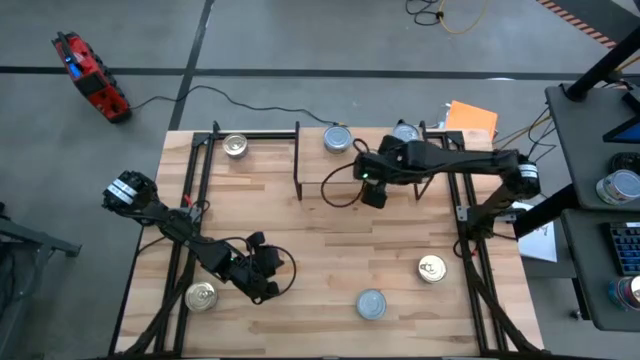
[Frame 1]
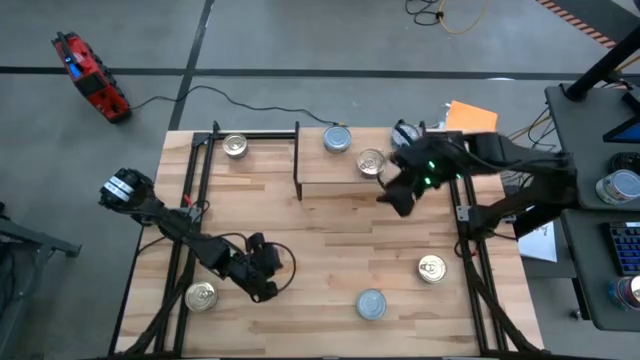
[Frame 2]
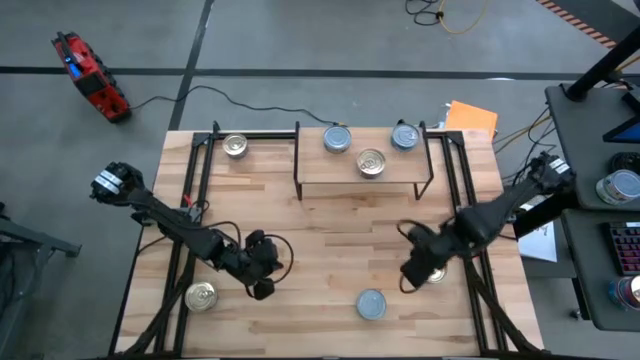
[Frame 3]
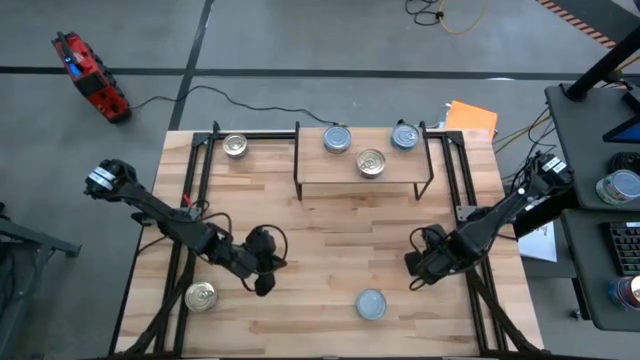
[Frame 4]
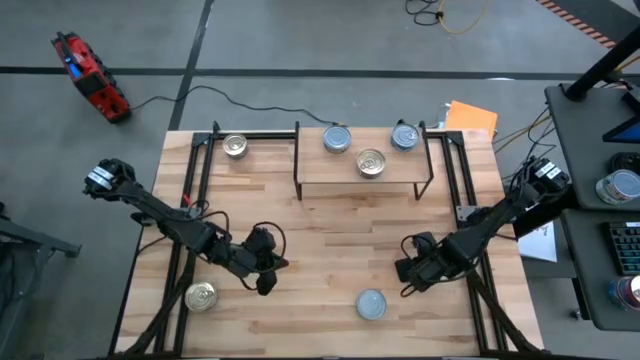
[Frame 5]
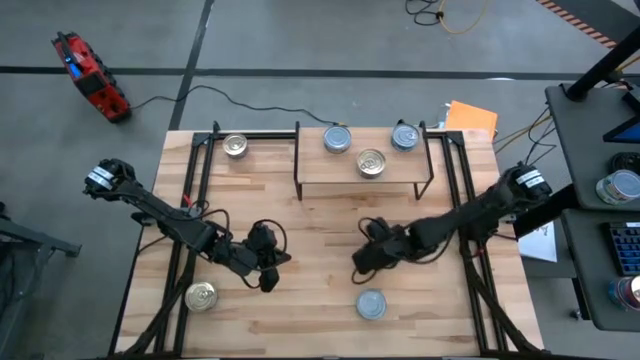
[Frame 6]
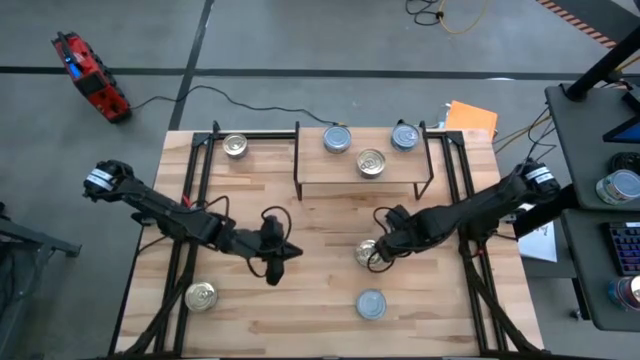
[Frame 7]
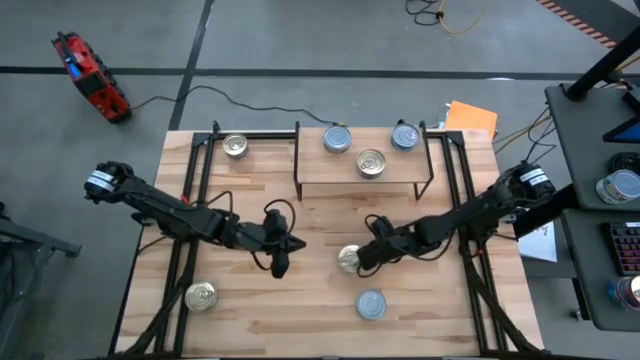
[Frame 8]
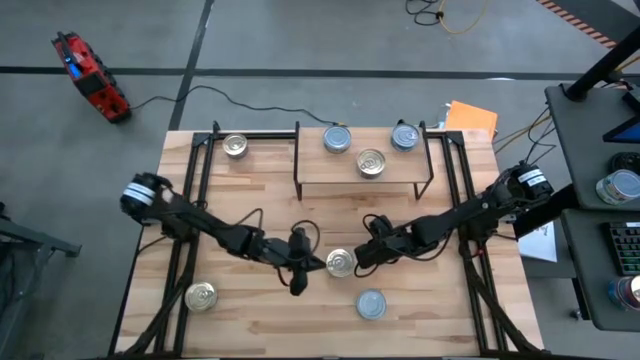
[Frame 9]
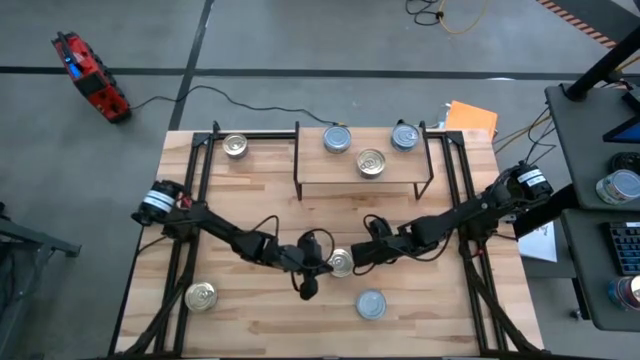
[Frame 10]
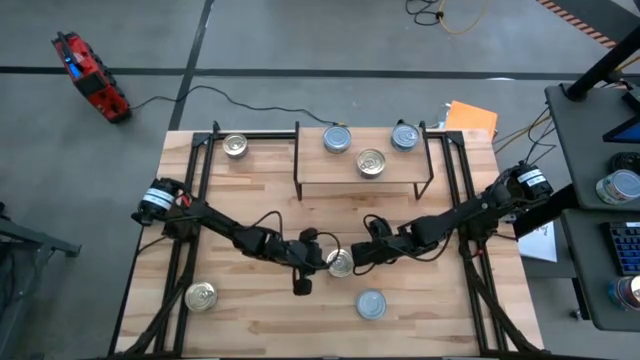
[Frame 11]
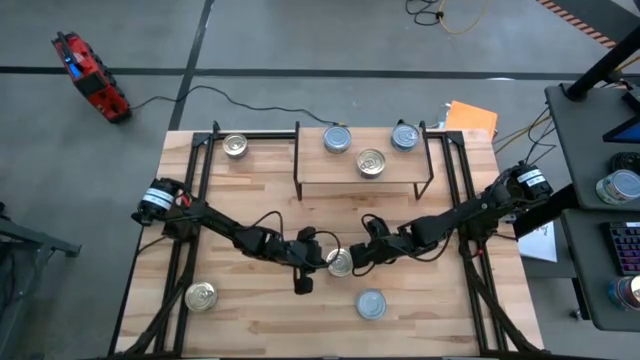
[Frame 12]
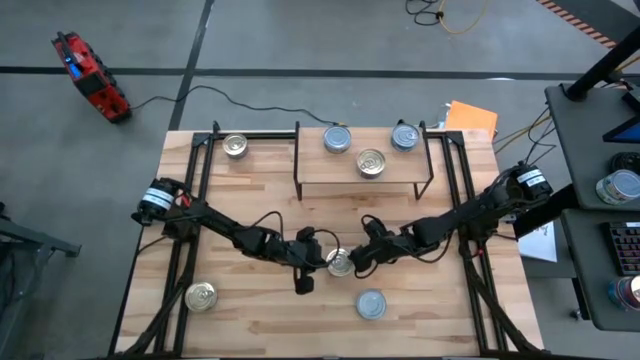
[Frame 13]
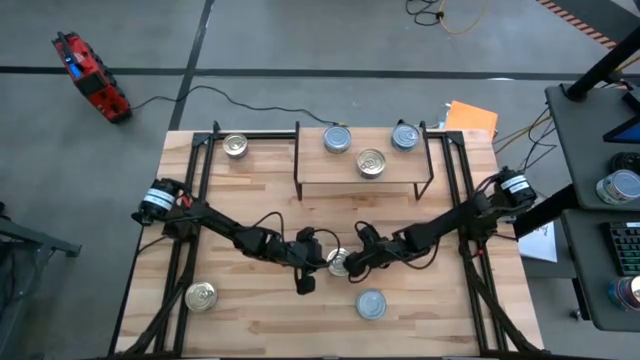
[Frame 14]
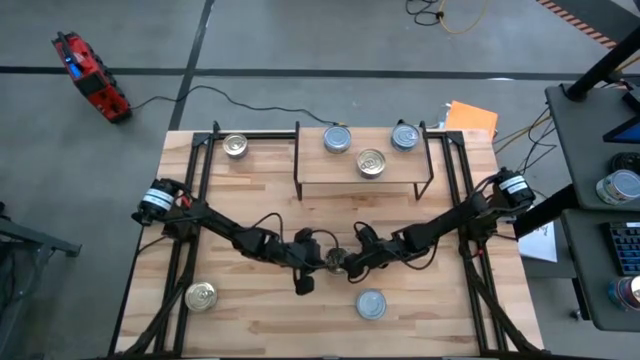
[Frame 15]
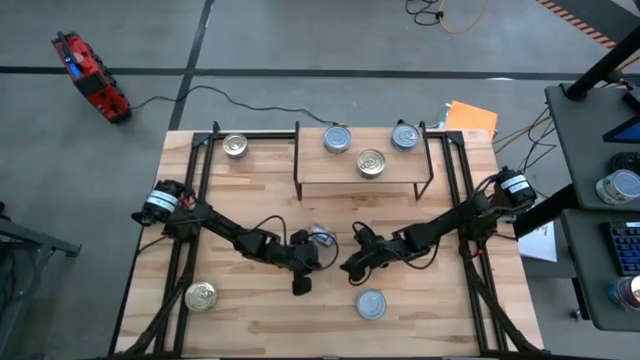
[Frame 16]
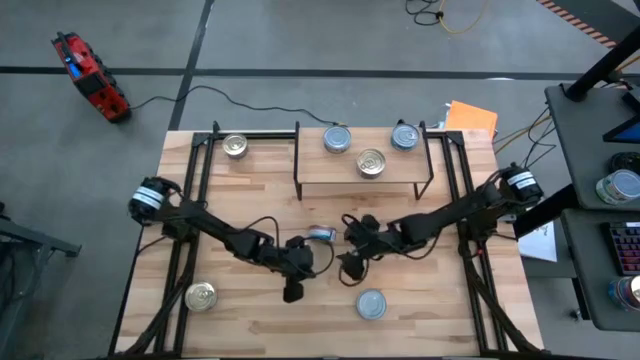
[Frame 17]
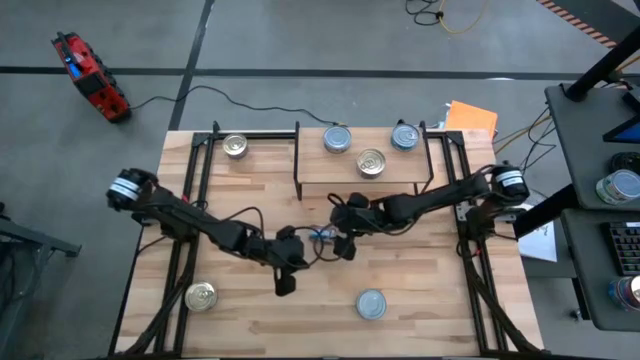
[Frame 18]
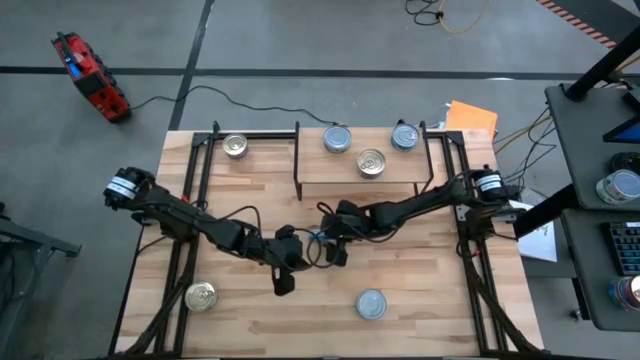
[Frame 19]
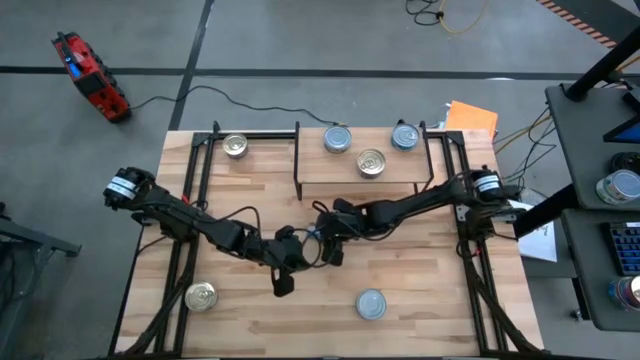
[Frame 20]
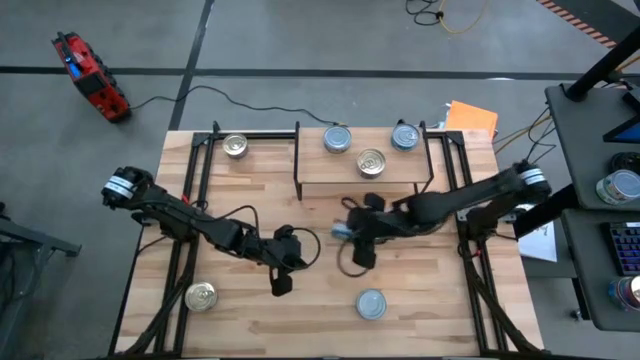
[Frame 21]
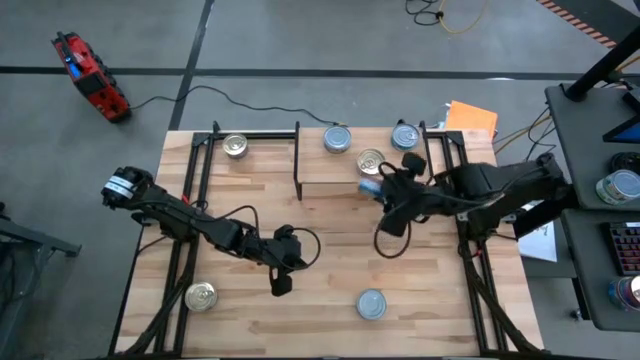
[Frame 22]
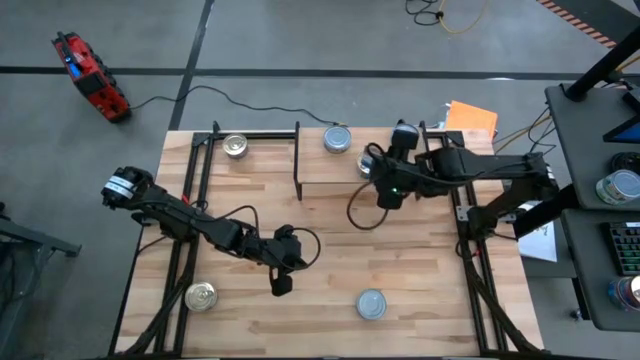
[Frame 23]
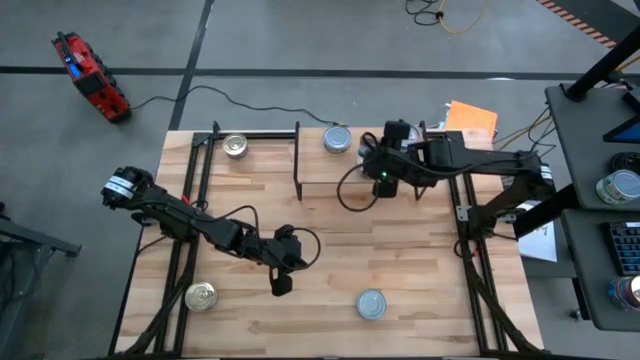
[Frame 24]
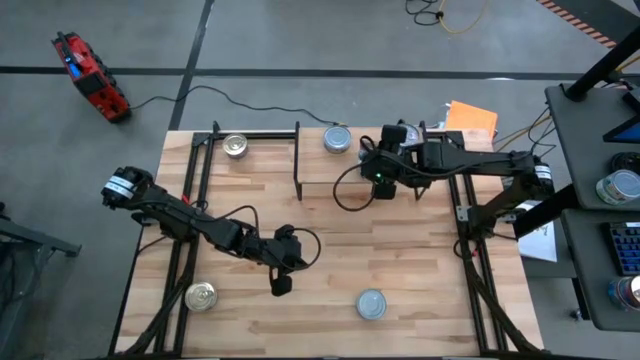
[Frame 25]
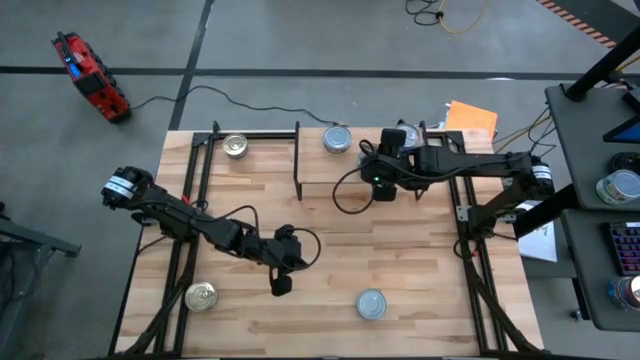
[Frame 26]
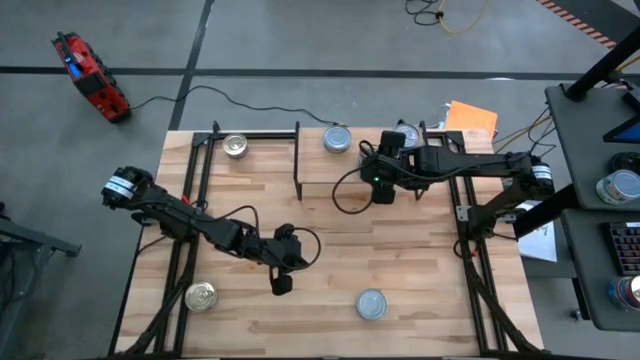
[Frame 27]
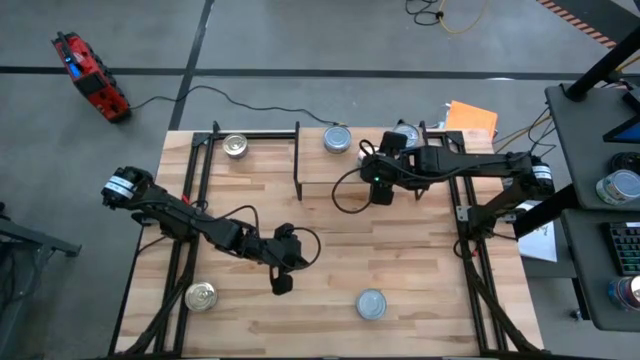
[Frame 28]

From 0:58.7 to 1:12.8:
Task: Stack canned seafood by type on shelf
Stack the blue-pink tuna can on top of the other blue-pink tuna can

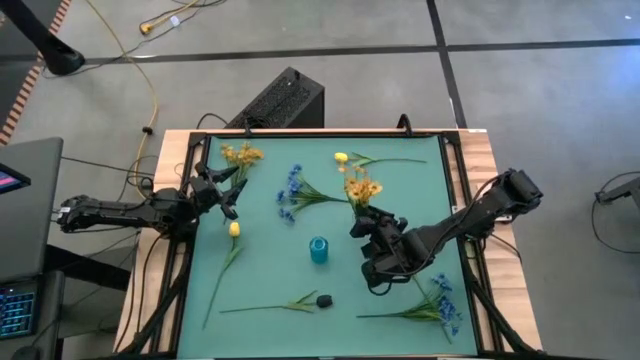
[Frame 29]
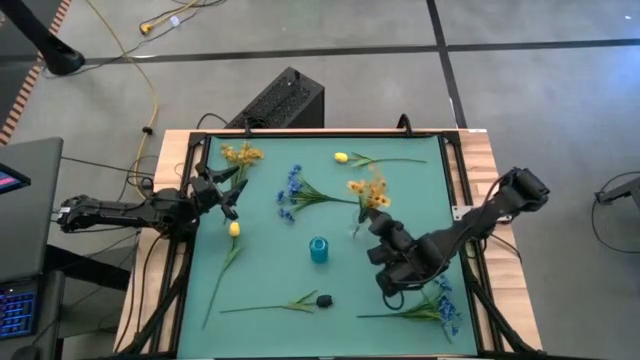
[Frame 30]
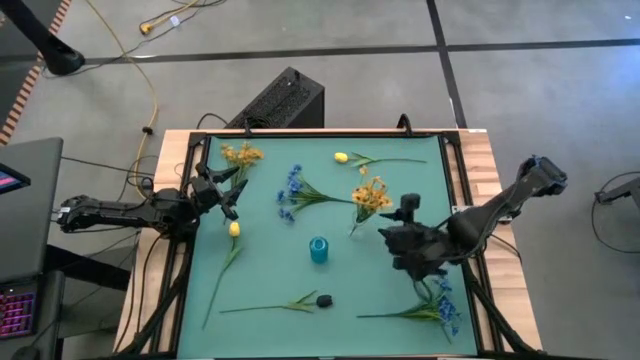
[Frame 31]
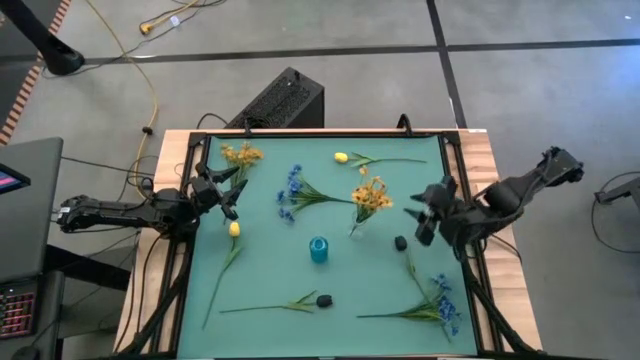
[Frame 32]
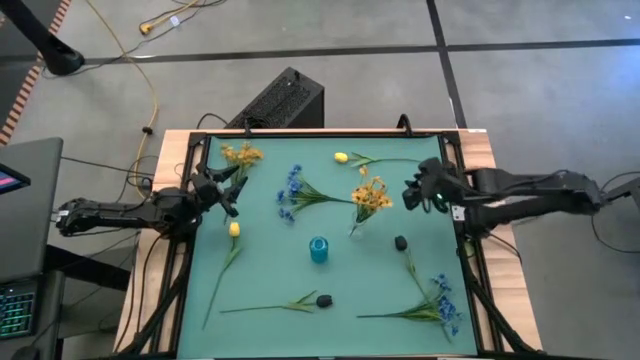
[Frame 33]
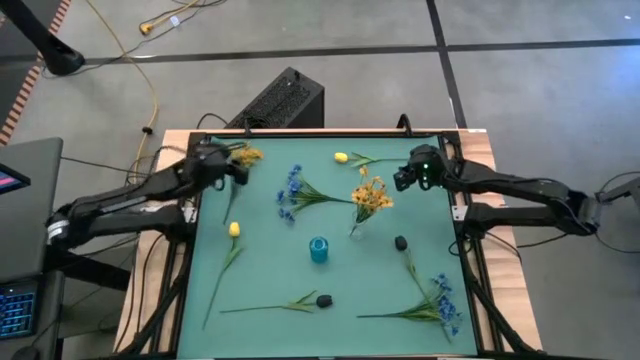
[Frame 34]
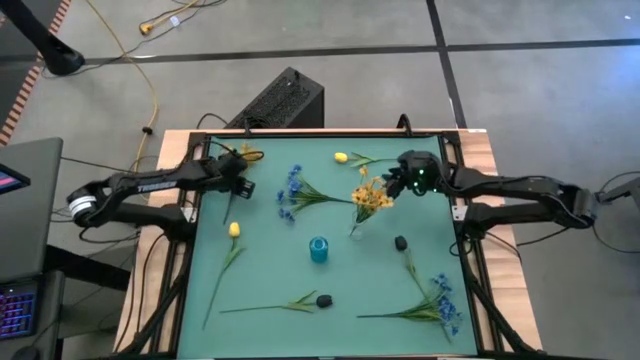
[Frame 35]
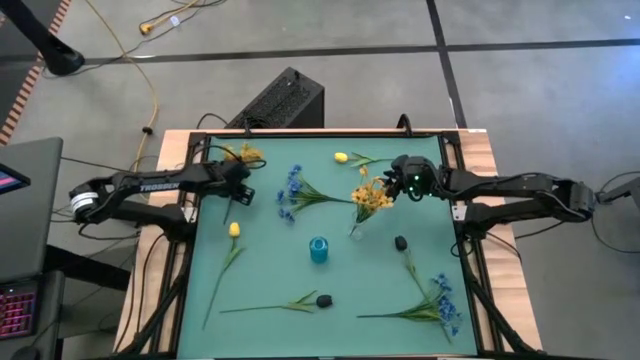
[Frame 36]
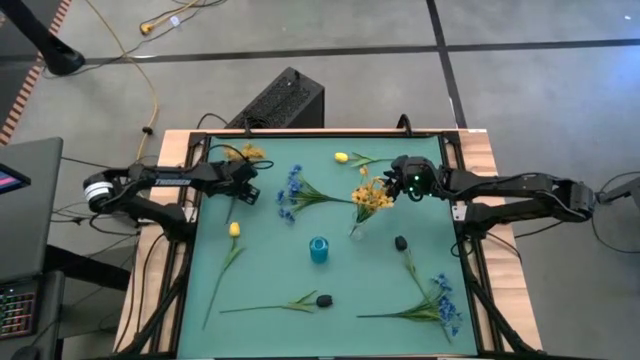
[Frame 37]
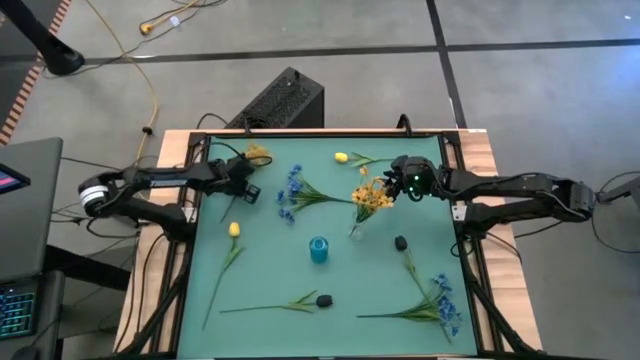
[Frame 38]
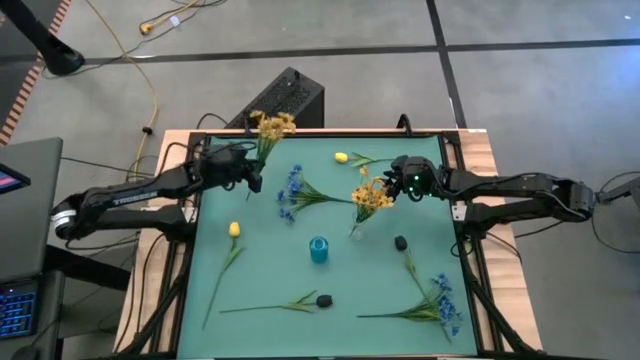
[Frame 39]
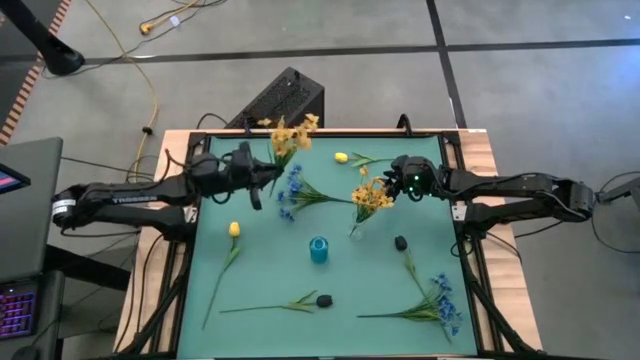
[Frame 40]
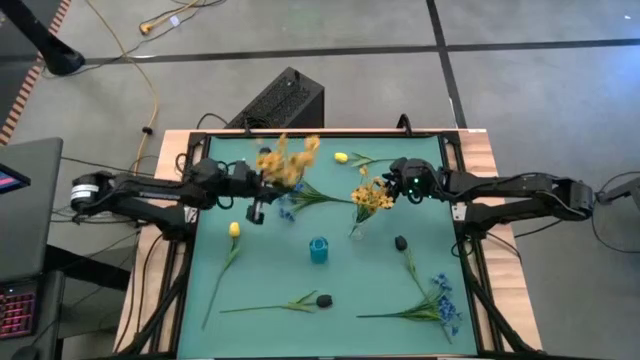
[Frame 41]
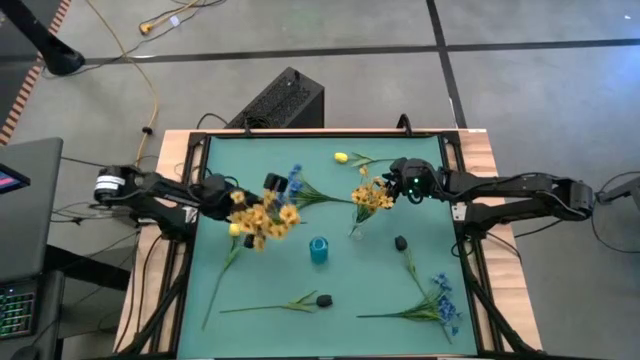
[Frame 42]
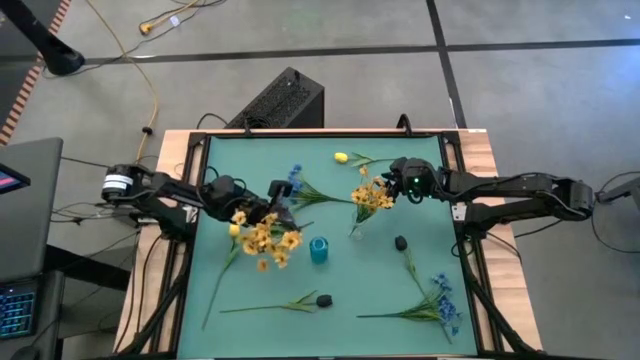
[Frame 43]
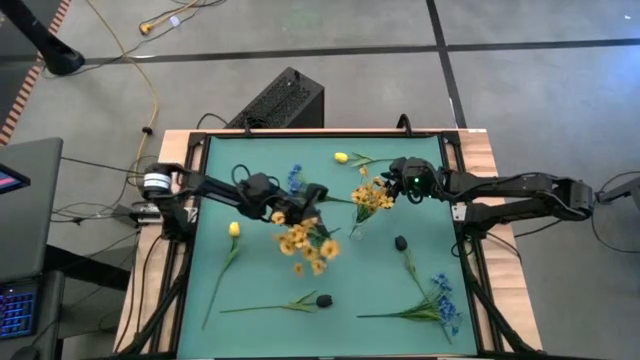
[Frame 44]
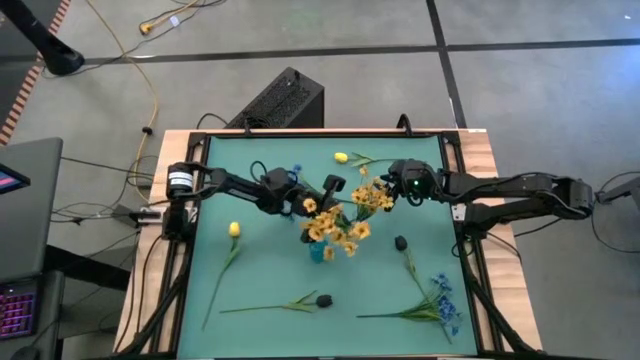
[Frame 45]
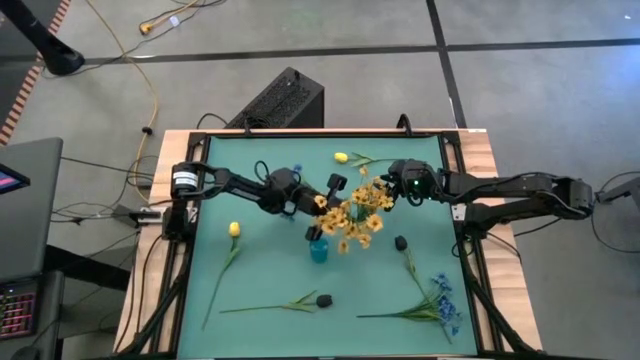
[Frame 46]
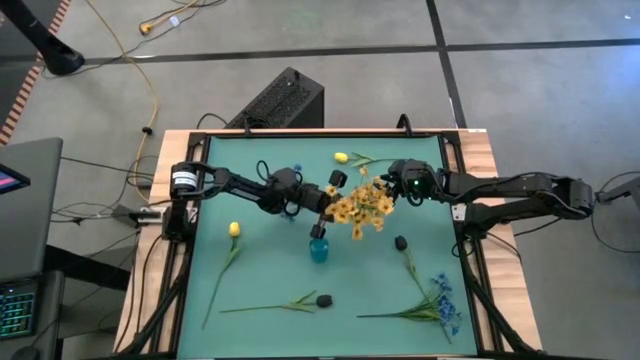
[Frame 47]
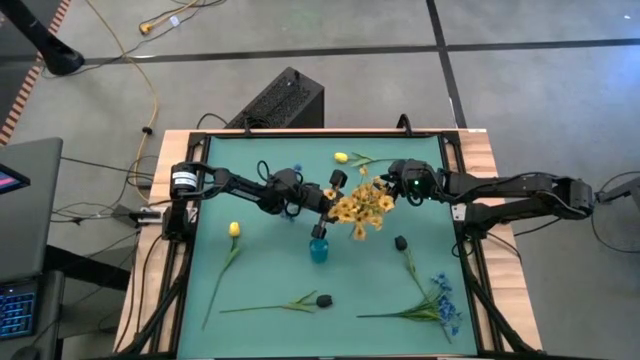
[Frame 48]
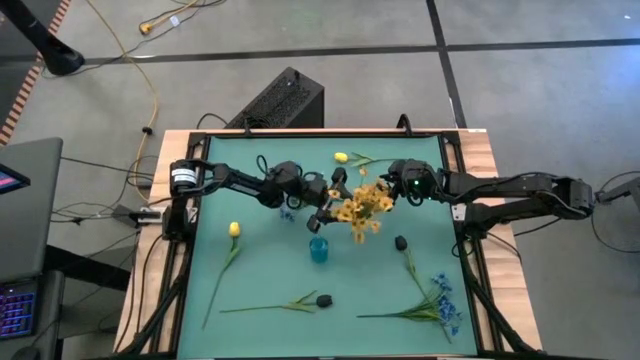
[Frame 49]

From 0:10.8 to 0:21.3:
Task: Sort flowers into vase by color
Put the yellow flower into the transparent vase
